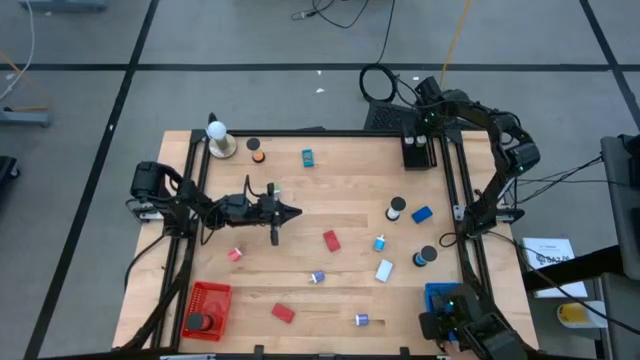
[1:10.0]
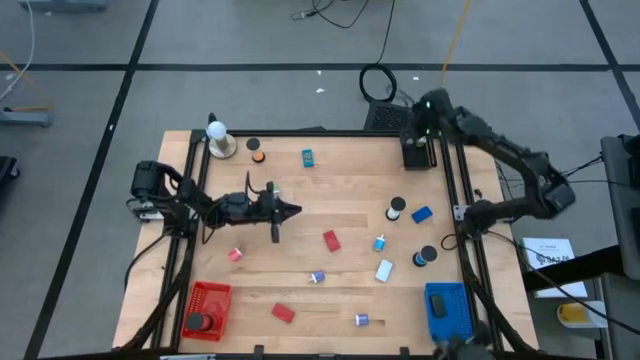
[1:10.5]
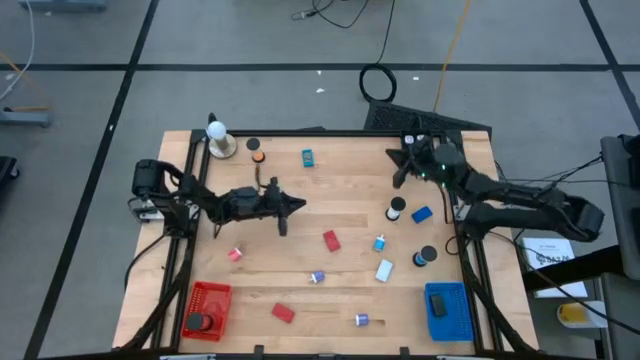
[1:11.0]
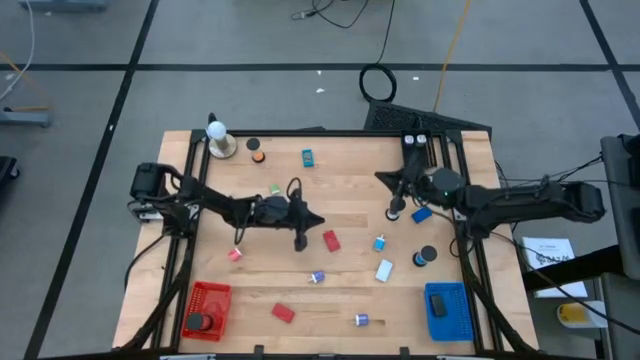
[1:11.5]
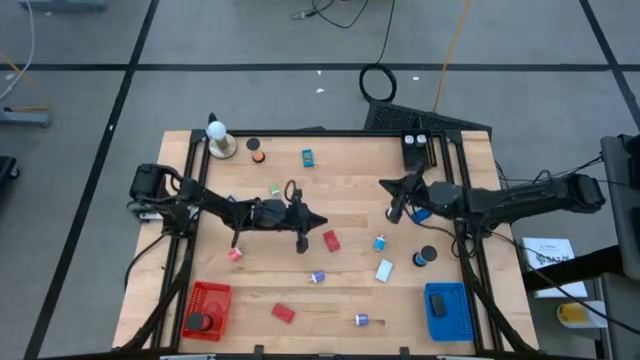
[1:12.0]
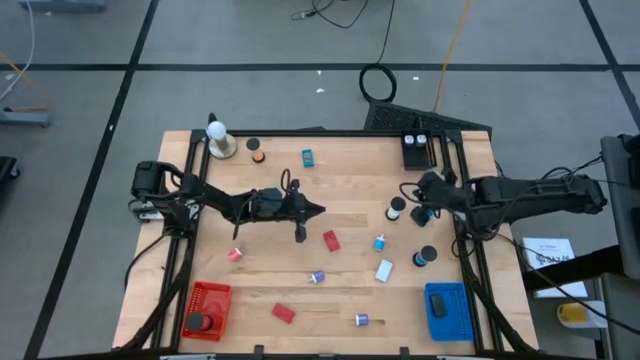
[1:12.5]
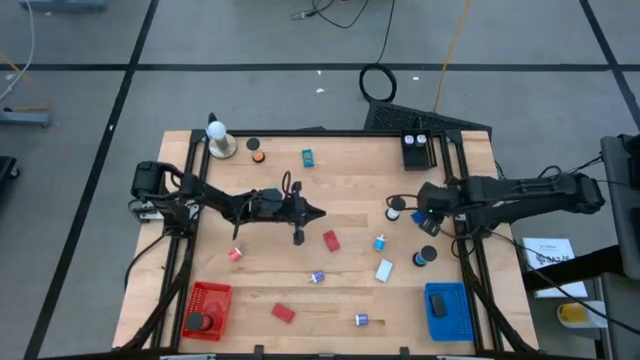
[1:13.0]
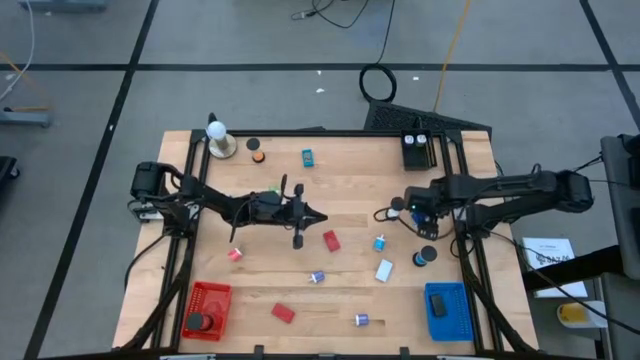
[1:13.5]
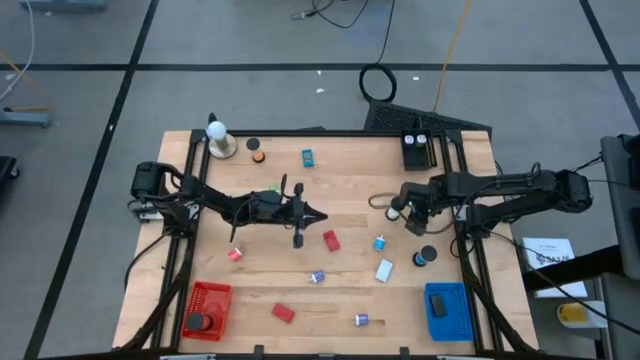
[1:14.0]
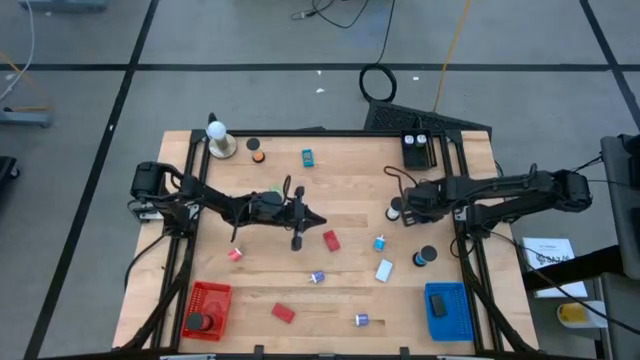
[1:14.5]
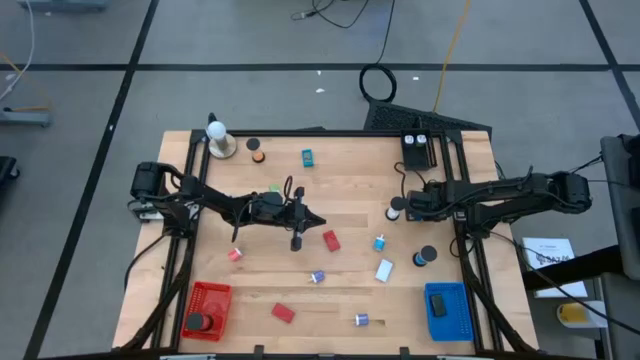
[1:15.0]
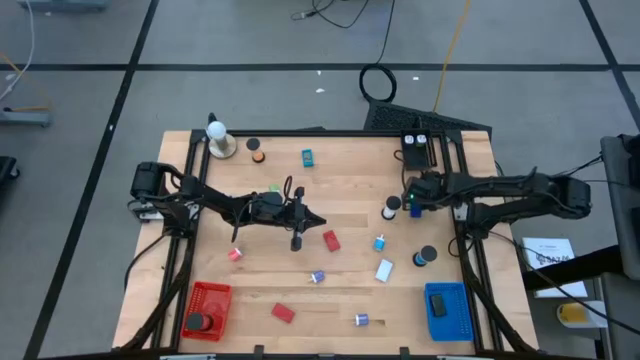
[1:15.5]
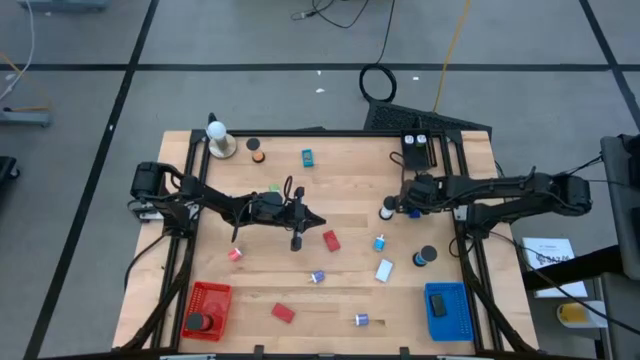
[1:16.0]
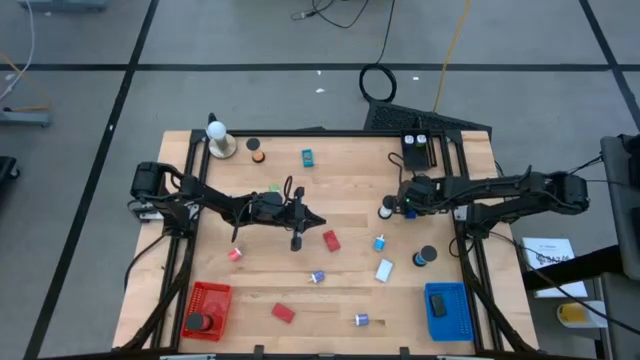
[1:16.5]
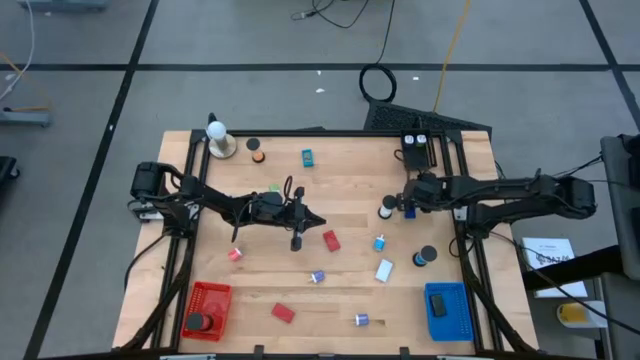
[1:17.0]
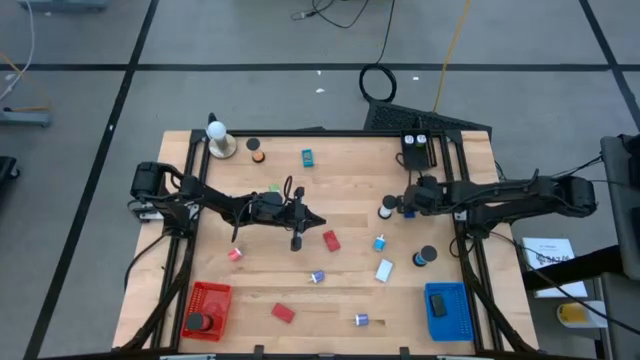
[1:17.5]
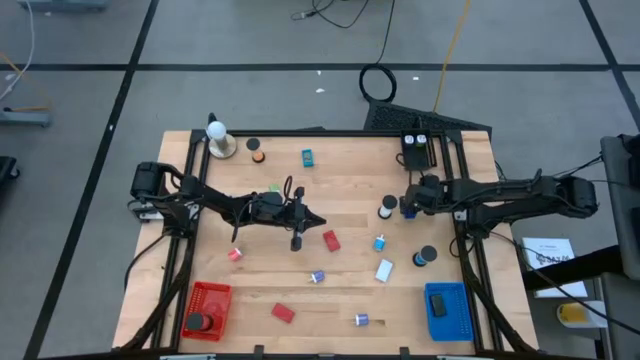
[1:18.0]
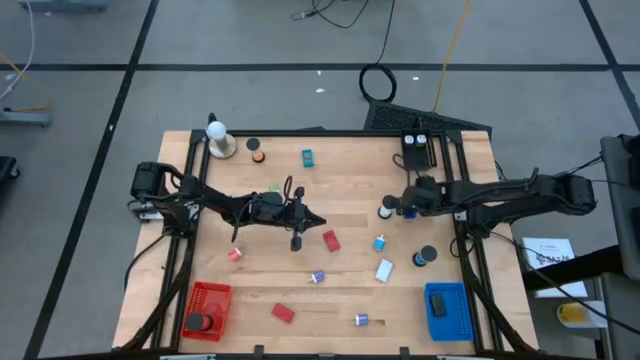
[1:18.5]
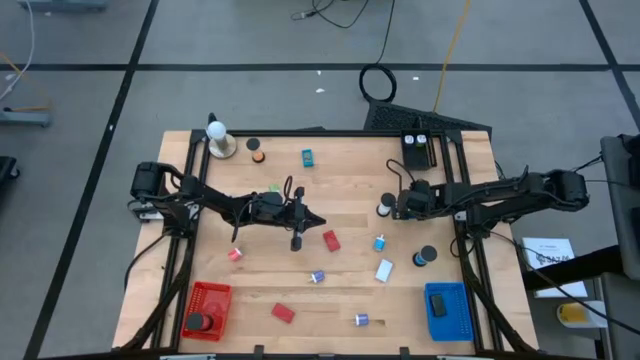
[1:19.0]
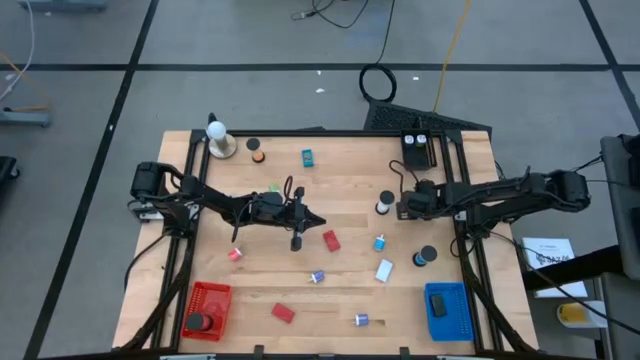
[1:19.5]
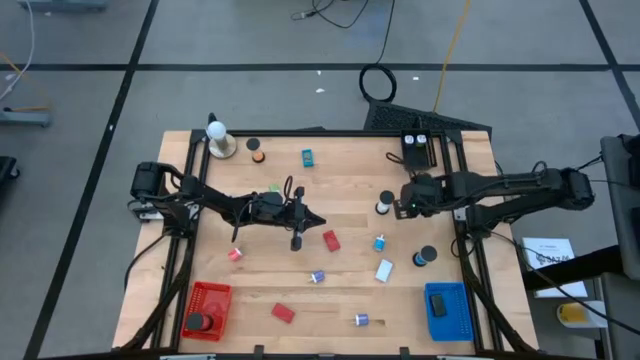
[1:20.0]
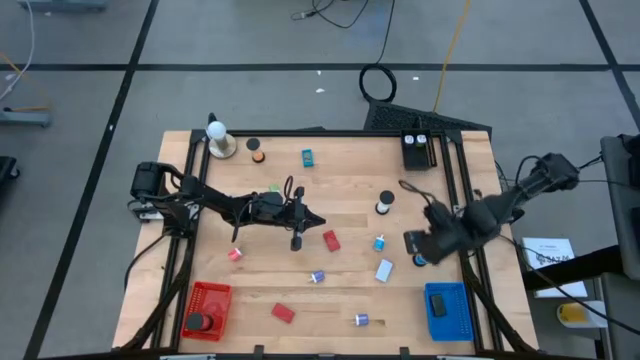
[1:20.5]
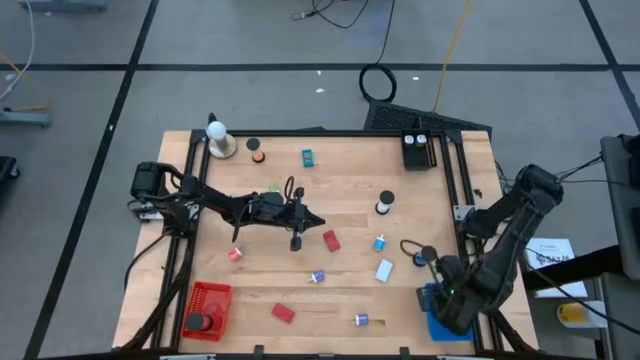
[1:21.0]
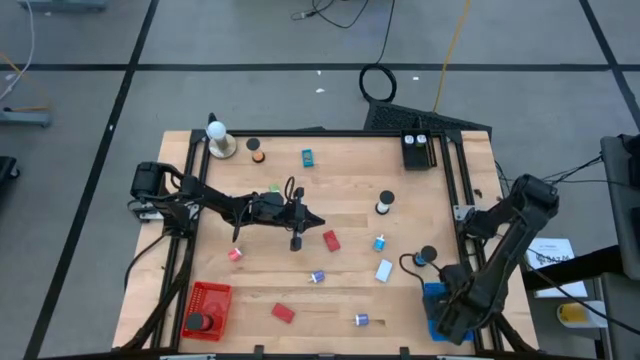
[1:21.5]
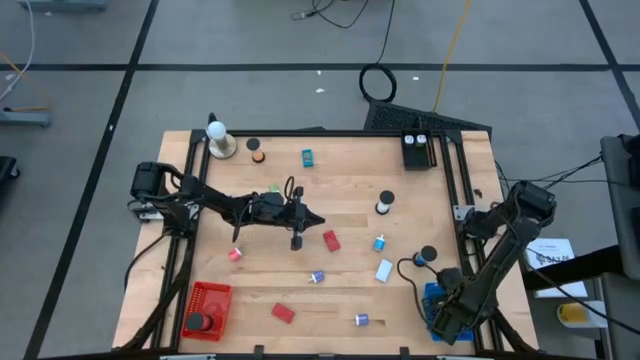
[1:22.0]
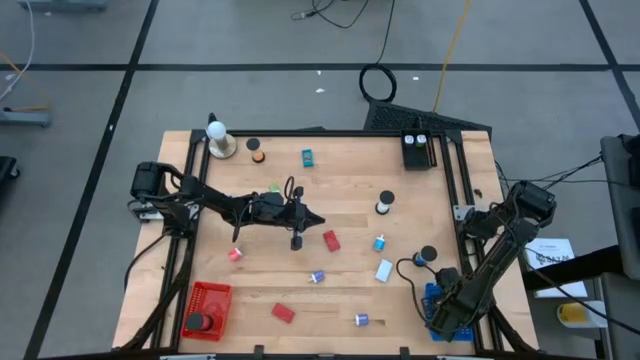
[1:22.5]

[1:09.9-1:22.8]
Task: Pick & Place Office items
Put the dark blue digital clock into the blue bin

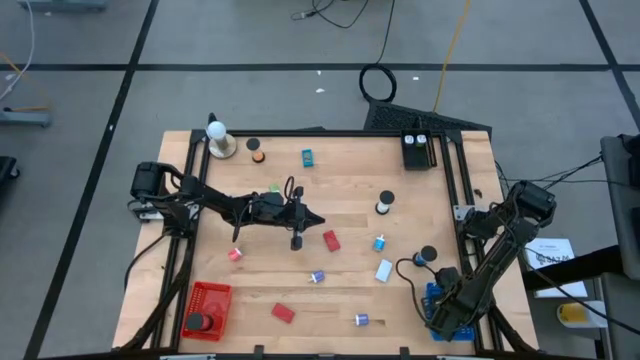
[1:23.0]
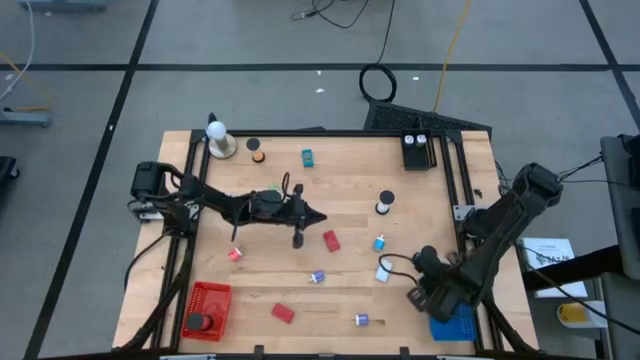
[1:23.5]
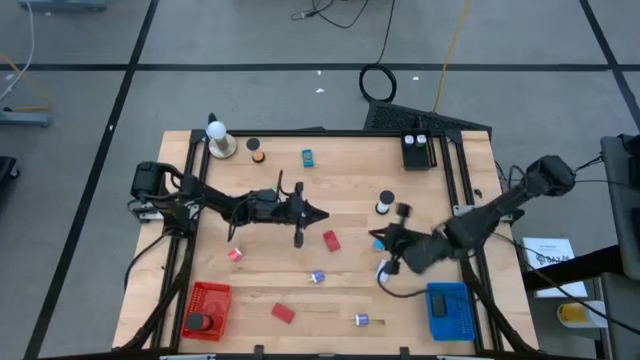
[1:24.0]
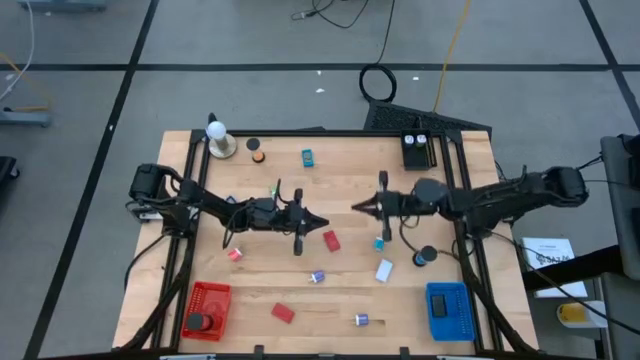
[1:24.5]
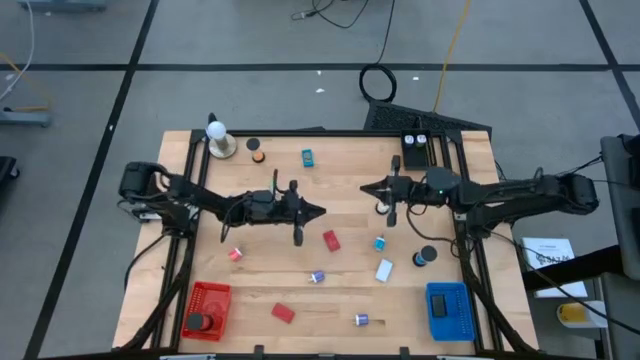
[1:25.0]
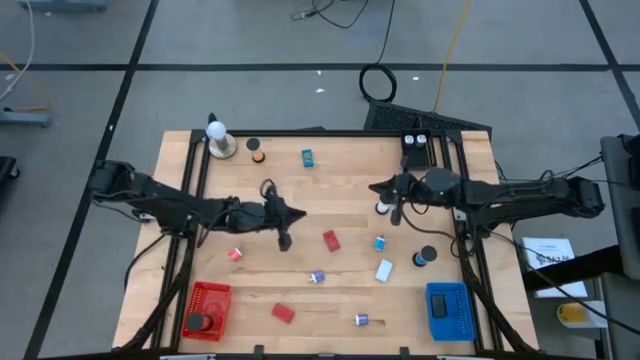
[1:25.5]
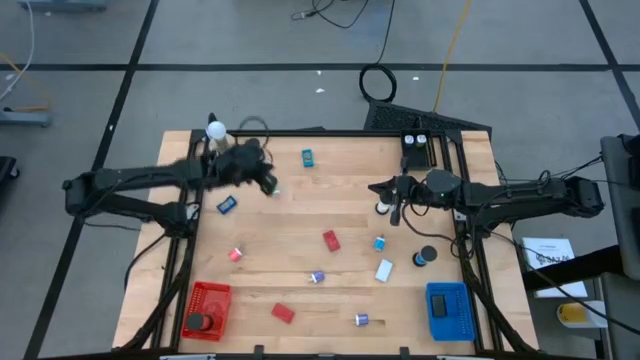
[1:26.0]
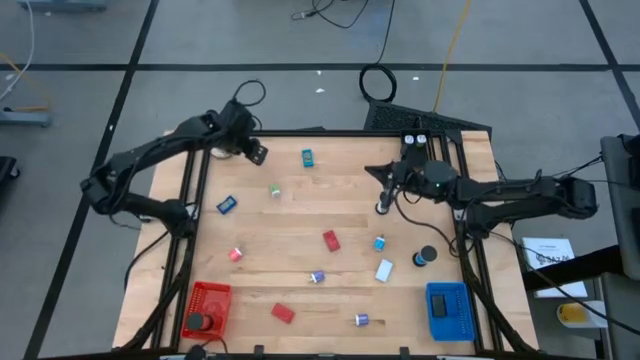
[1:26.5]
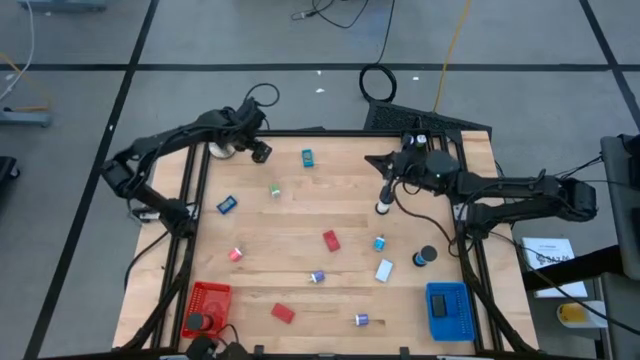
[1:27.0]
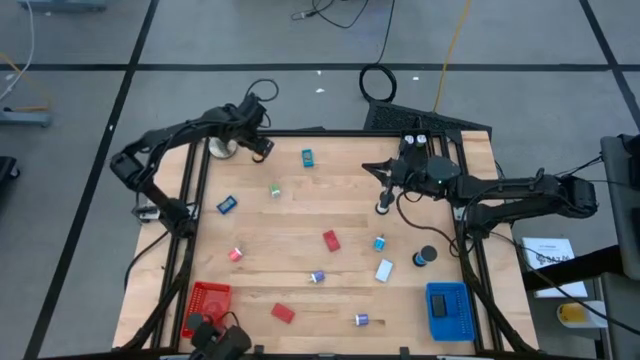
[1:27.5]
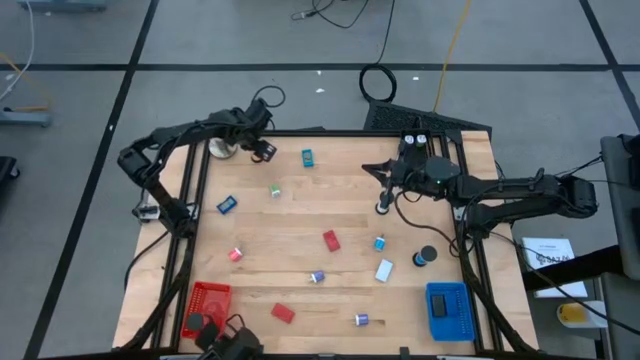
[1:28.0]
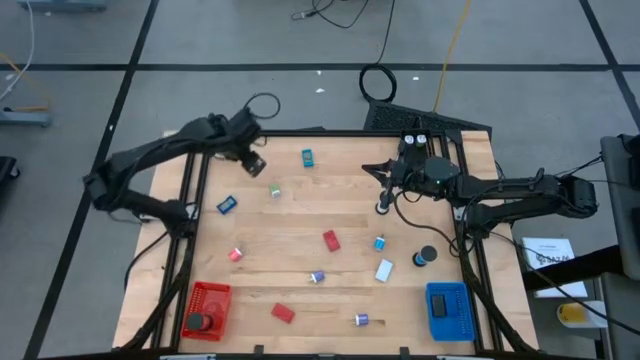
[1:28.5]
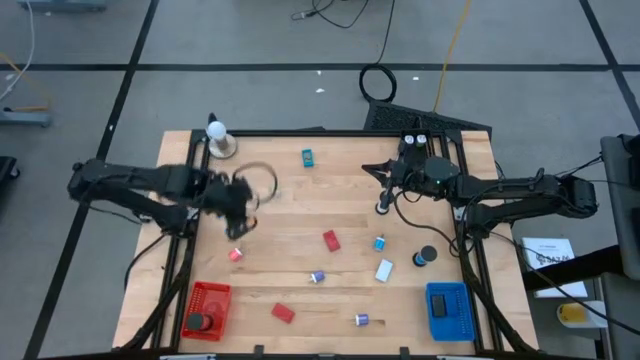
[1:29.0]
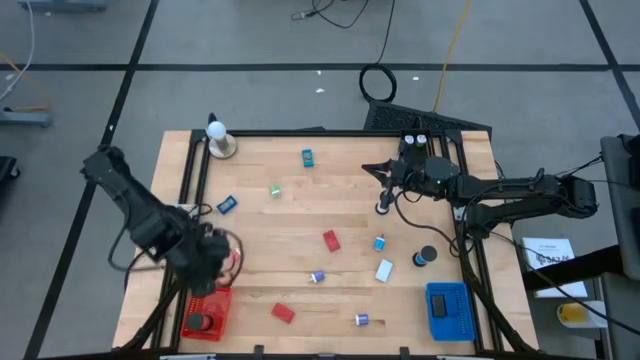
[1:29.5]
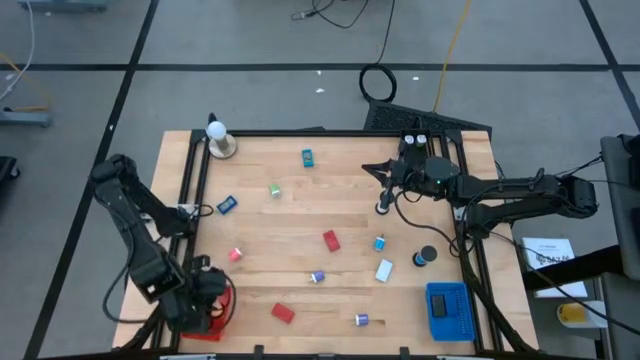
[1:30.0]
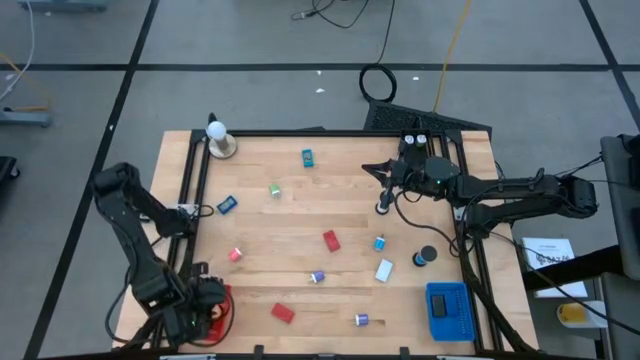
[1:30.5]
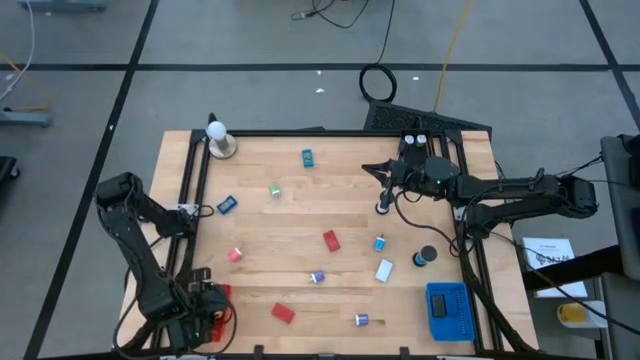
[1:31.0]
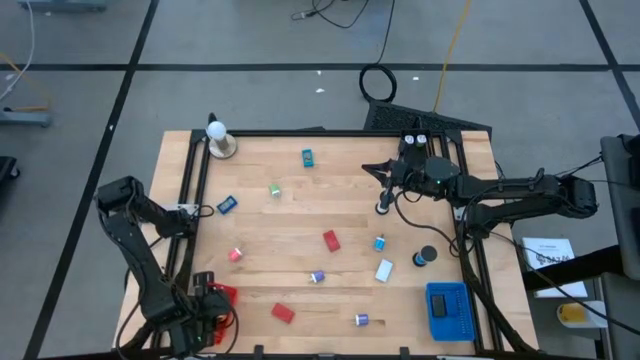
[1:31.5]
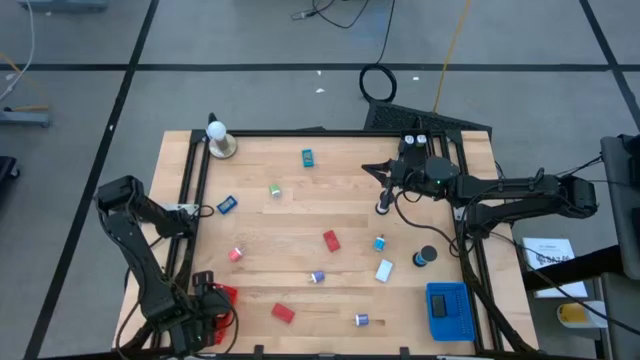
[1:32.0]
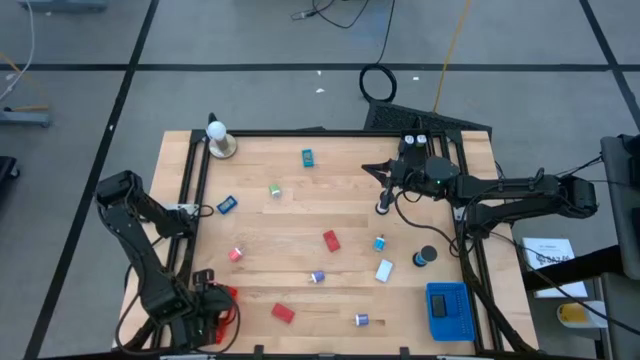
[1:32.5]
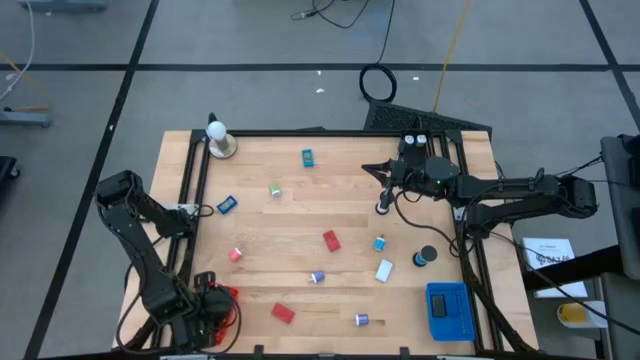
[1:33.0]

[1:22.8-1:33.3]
Put the orange hourglass into the red bin
